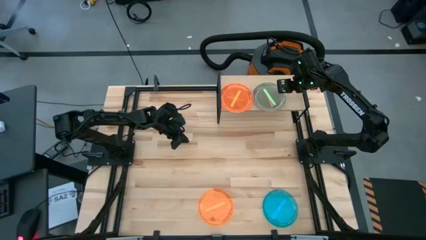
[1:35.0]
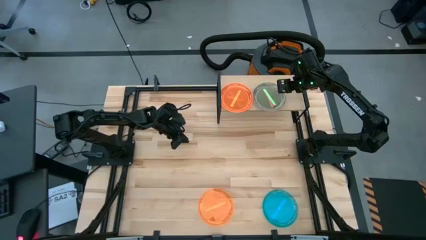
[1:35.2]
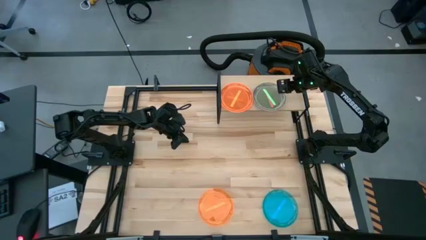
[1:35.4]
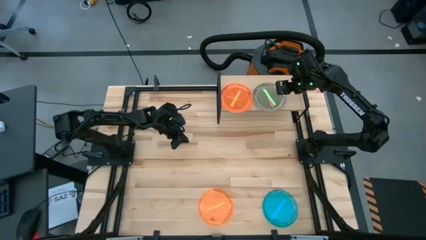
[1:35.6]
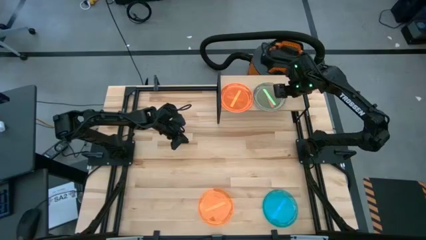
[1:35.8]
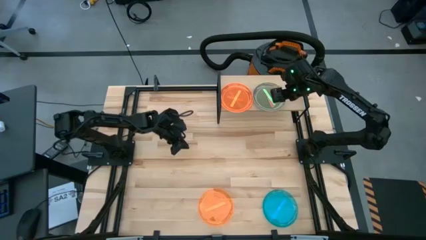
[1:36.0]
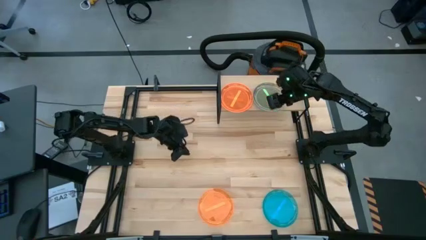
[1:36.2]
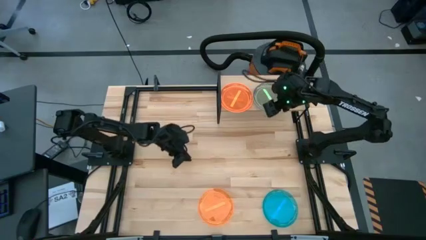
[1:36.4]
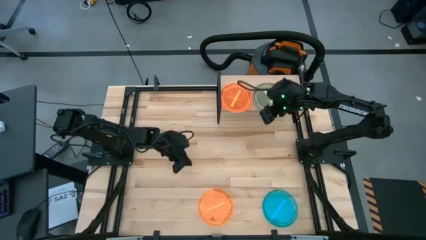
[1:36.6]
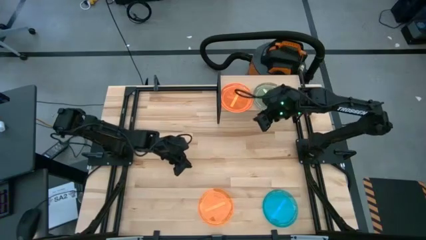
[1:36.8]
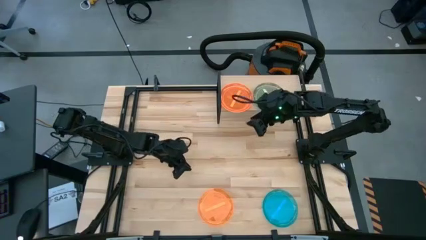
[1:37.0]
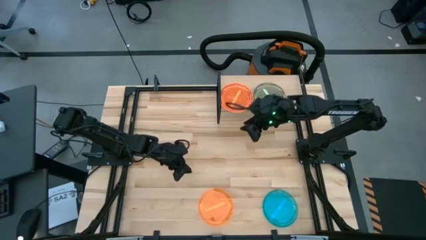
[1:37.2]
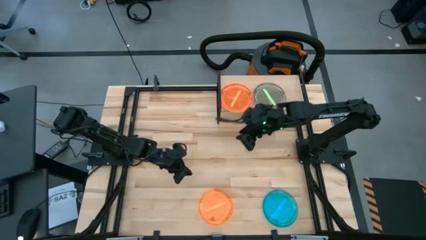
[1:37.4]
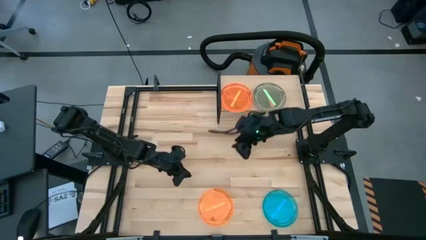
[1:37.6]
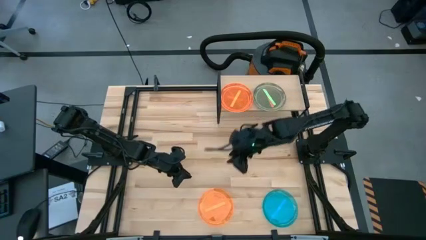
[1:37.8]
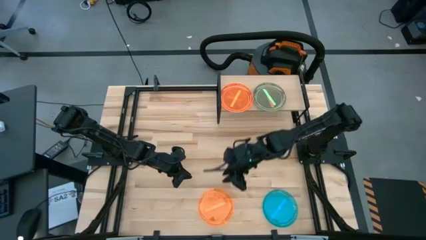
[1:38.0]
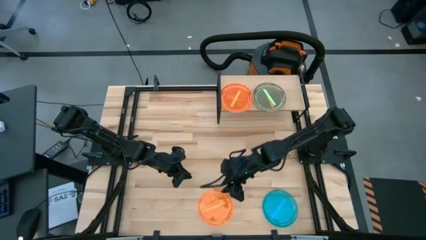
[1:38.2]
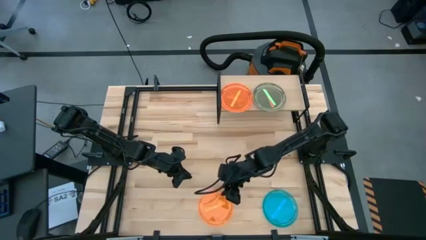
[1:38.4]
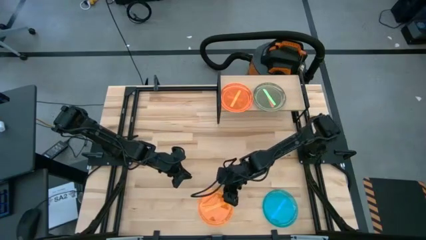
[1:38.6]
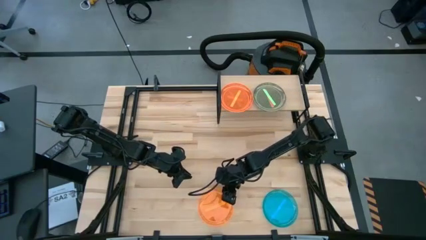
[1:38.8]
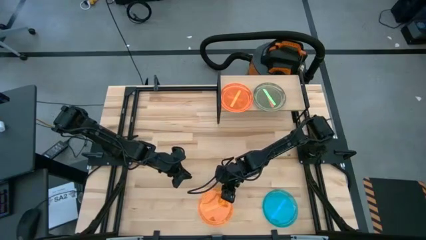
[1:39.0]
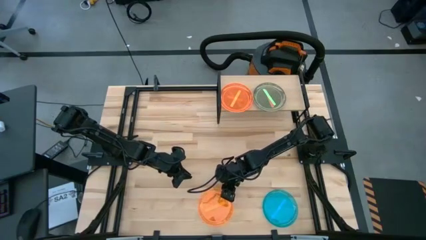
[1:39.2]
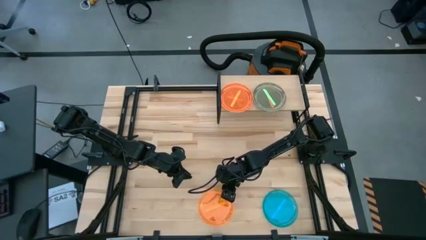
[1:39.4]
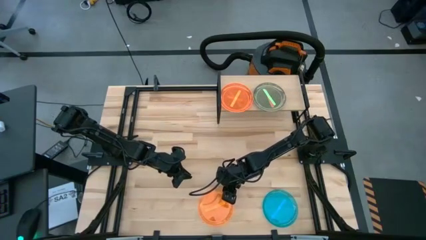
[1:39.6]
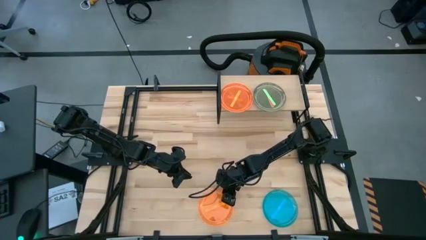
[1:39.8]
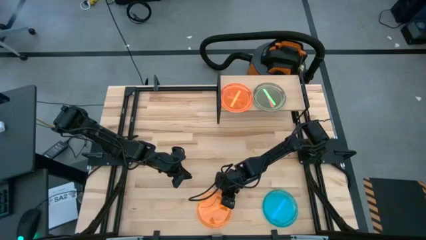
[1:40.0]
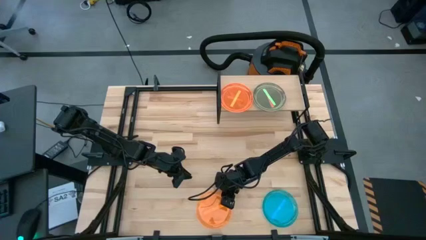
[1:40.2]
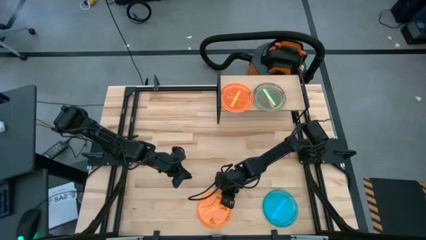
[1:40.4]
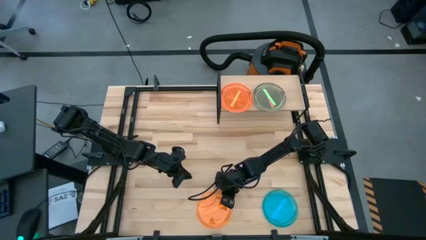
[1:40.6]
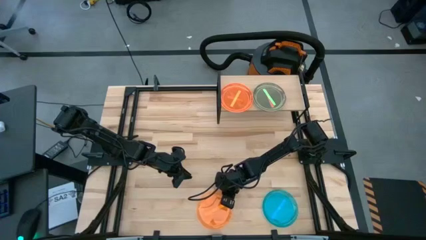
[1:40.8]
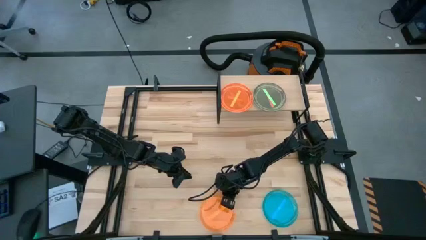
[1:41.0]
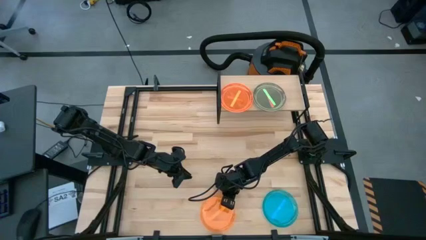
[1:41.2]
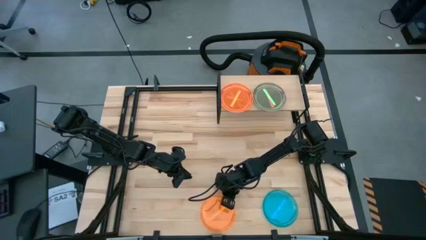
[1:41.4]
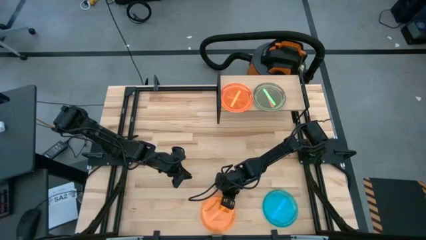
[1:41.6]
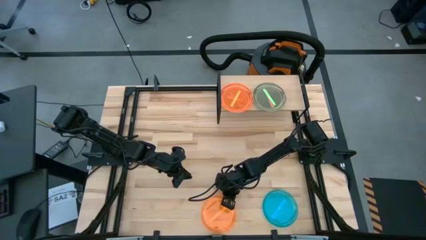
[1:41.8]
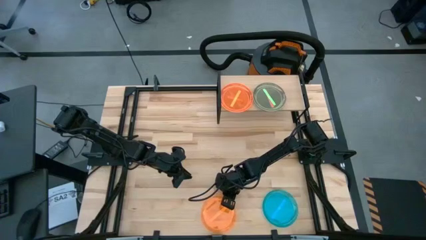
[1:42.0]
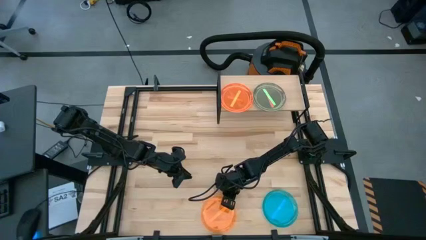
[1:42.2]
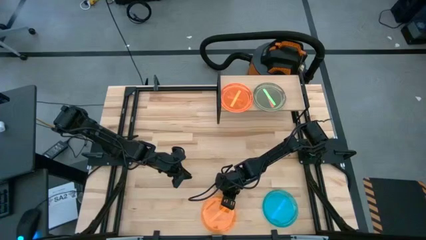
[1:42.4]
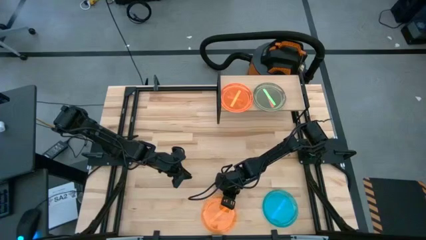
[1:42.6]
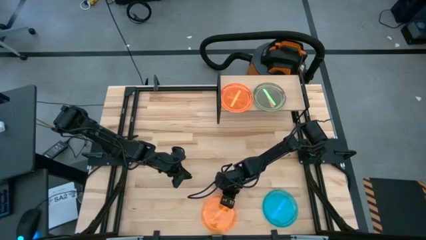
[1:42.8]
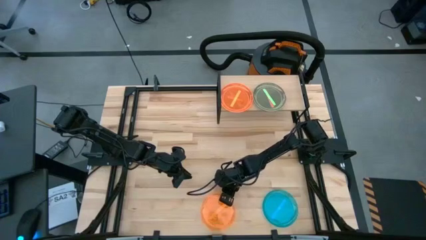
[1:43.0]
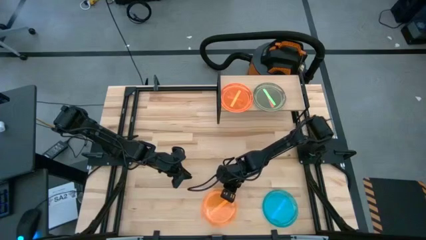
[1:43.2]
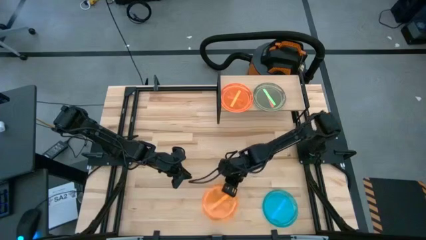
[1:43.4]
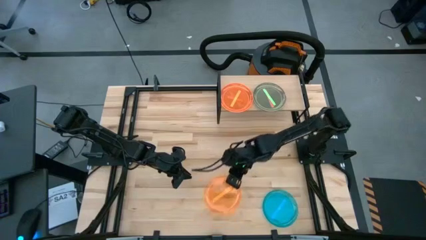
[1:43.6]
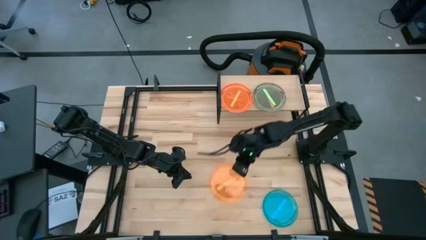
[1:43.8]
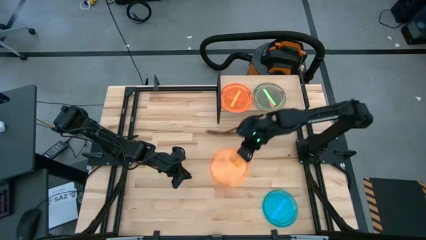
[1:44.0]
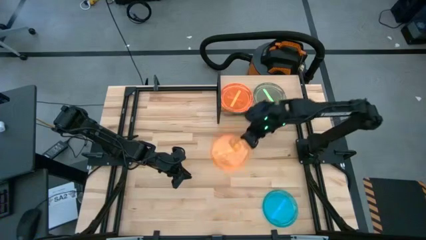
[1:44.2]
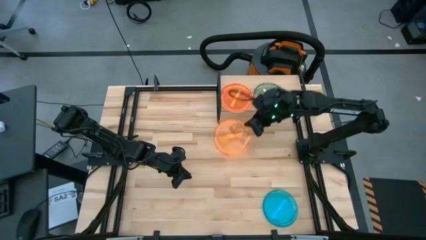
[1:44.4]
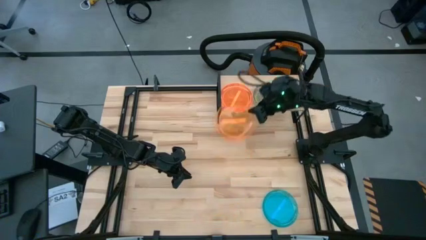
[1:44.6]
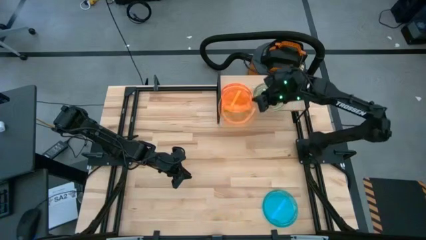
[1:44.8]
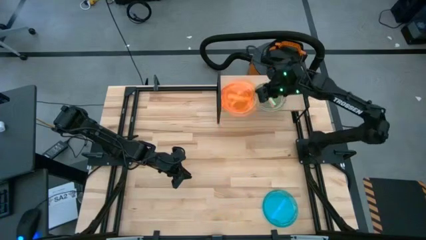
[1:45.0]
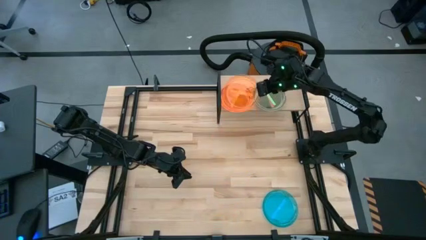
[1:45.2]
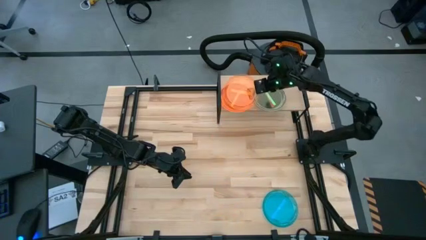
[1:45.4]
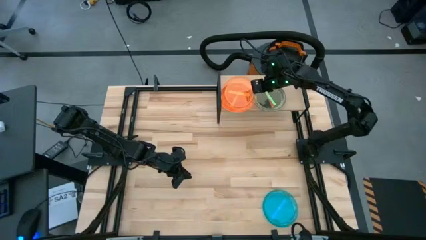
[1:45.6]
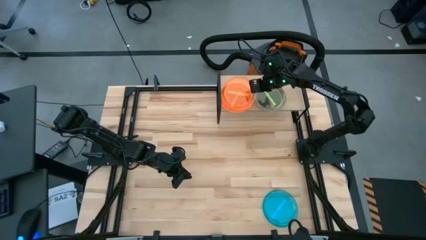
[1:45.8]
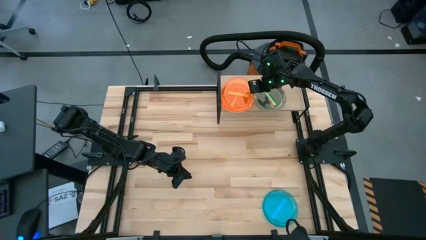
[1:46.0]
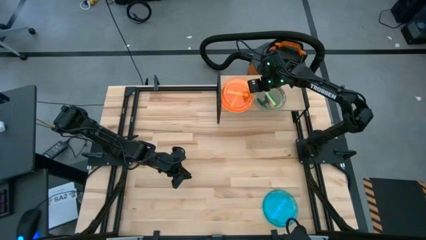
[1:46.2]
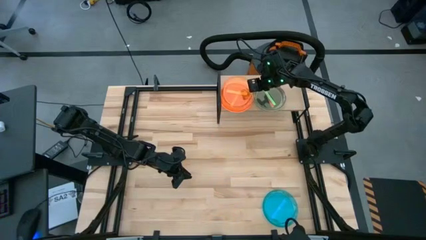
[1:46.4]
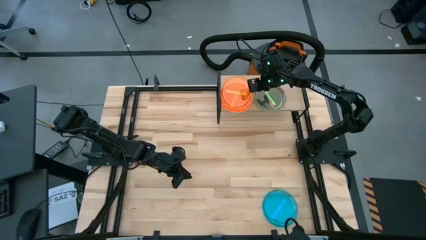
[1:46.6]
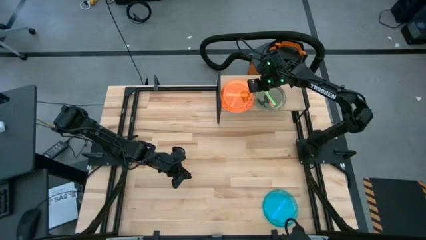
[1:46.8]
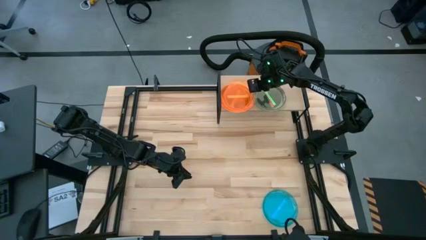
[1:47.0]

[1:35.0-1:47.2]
Task: Place and stack plates onto a shelf
Stack the orange plate on top of the orange plate on the shelf

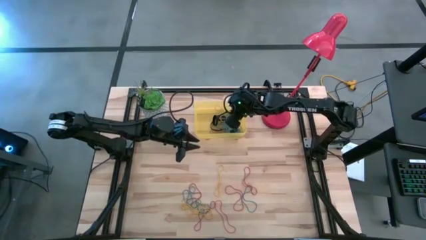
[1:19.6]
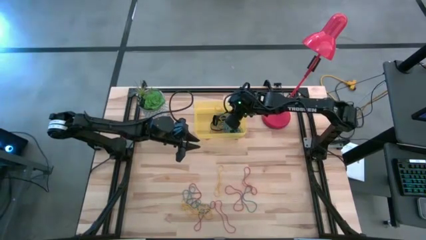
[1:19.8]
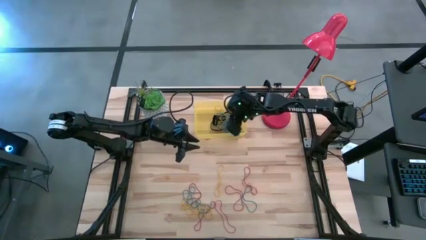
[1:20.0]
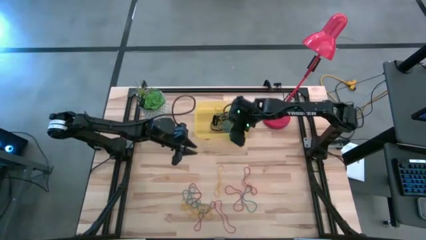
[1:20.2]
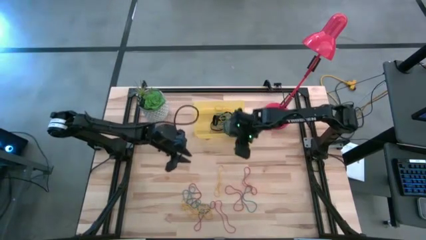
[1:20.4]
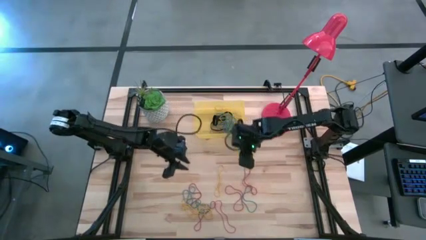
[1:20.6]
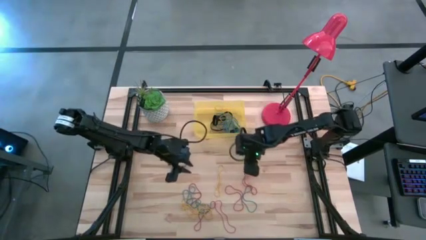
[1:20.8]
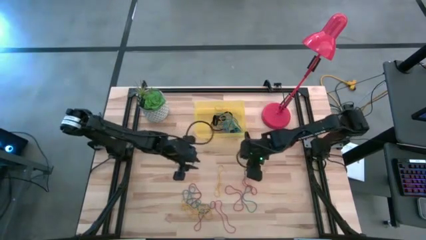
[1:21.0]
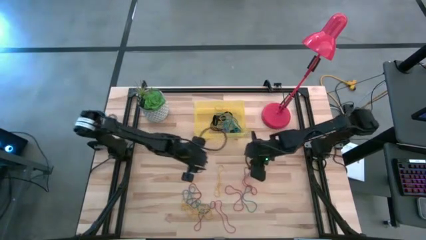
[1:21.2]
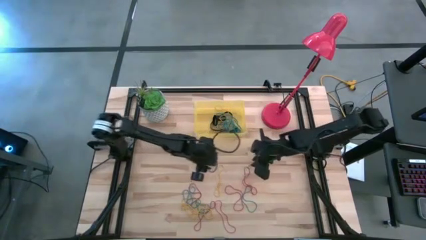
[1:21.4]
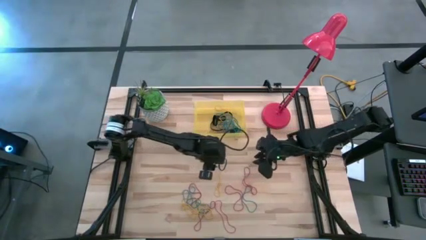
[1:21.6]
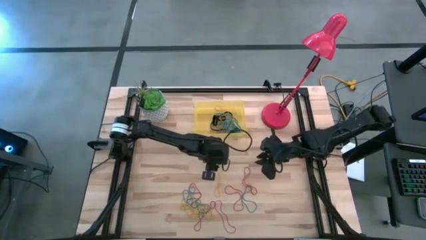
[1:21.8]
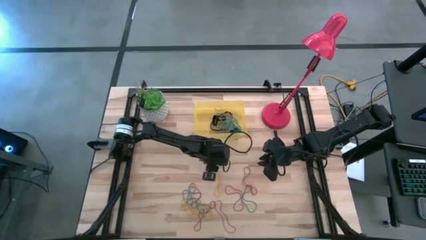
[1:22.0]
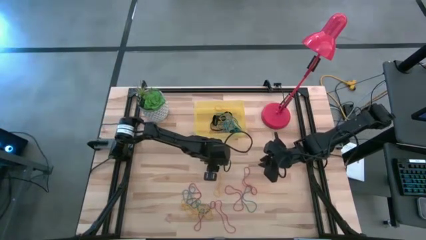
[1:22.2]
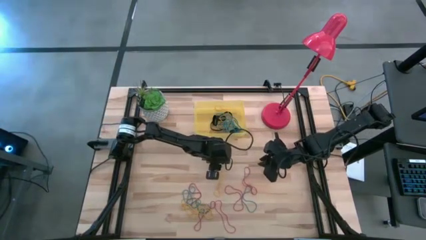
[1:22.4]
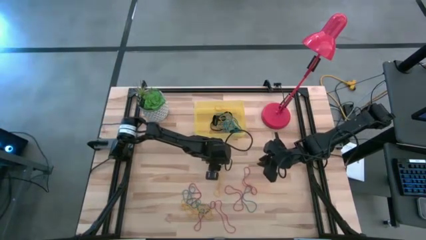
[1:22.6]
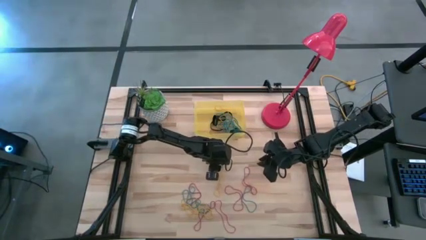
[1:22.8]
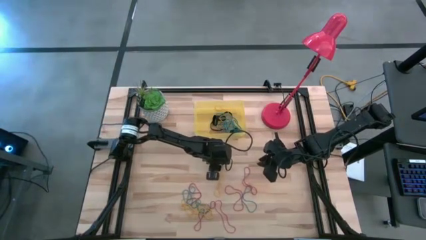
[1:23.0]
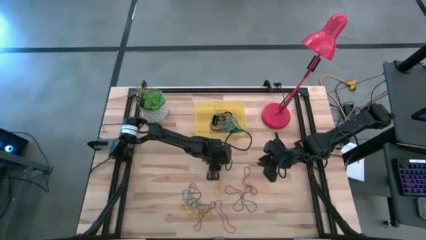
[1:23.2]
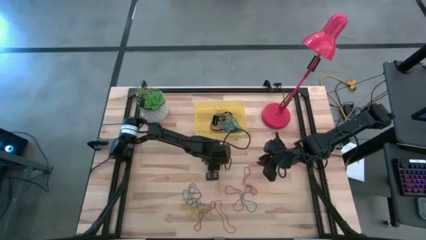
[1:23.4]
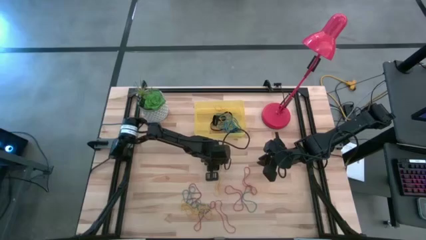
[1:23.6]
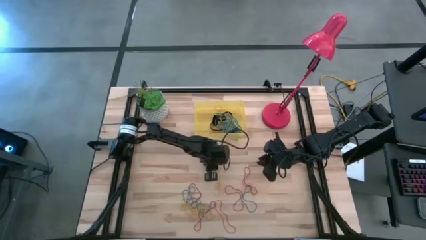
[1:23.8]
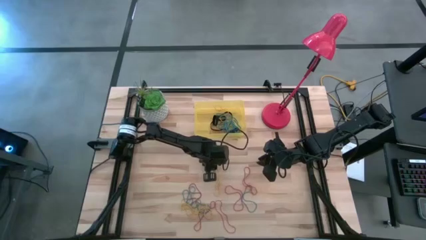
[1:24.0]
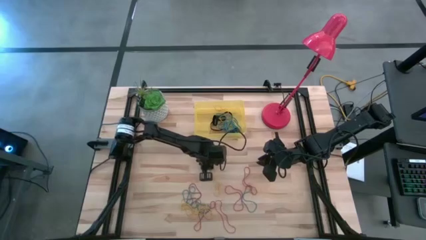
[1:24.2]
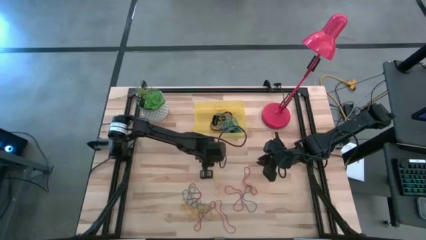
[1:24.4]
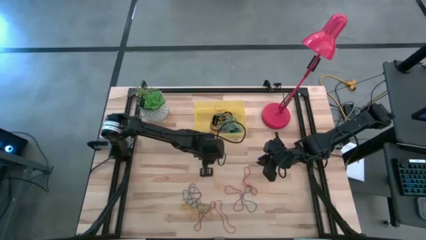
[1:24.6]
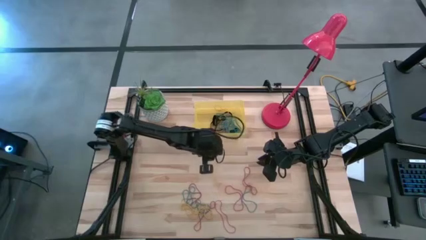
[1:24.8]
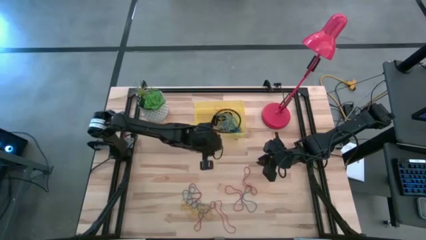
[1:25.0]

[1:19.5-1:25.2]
Task: Pick and place rubber bands into bin
Put the yellow rubber band into the yellow bin
